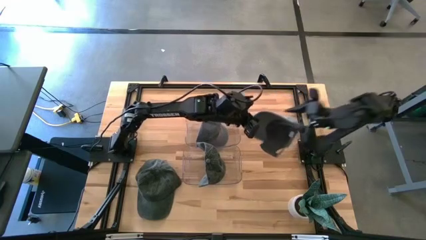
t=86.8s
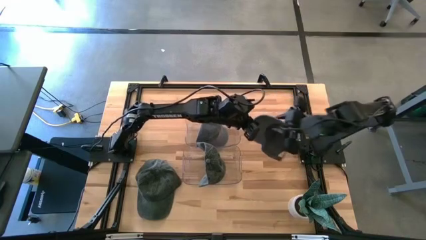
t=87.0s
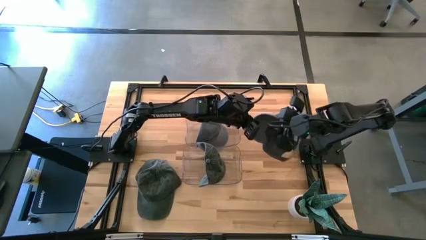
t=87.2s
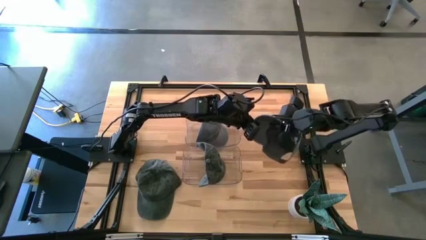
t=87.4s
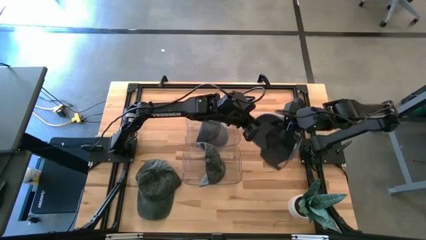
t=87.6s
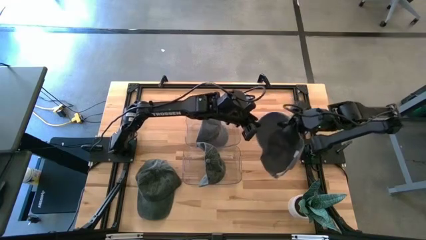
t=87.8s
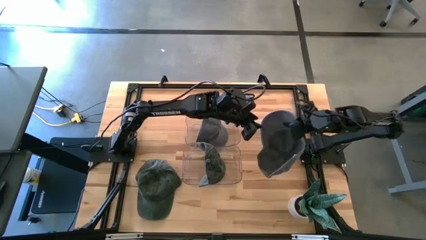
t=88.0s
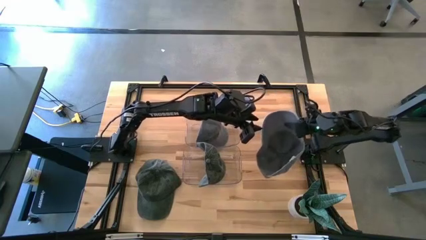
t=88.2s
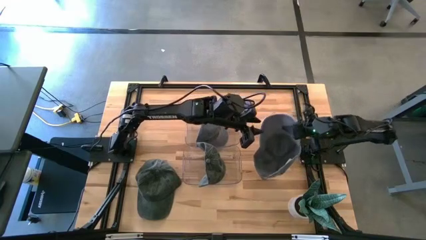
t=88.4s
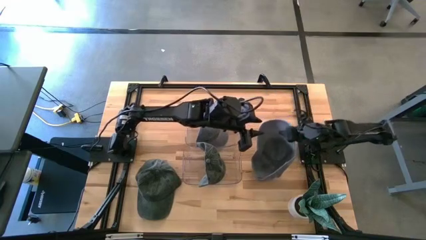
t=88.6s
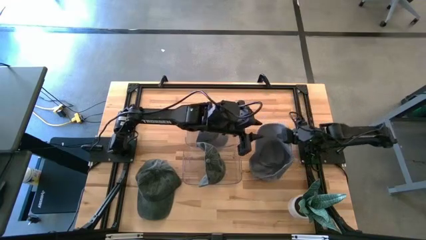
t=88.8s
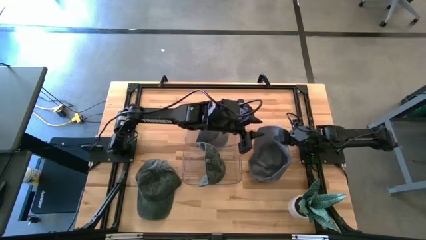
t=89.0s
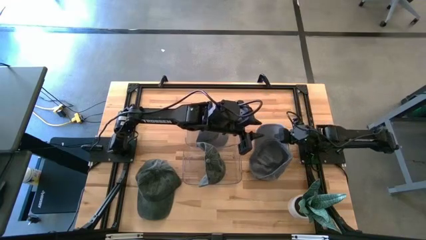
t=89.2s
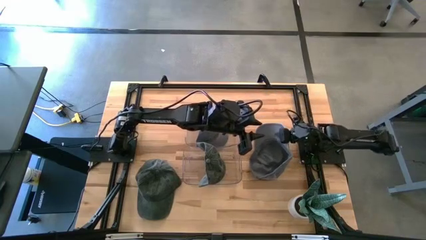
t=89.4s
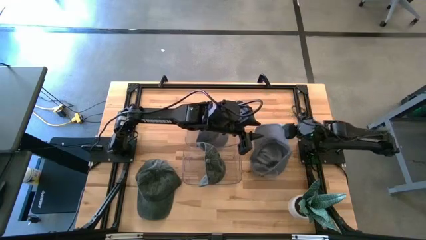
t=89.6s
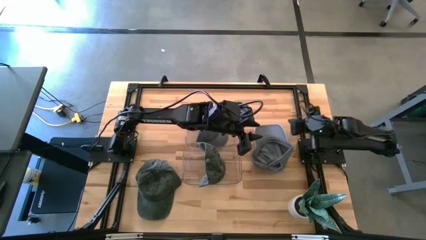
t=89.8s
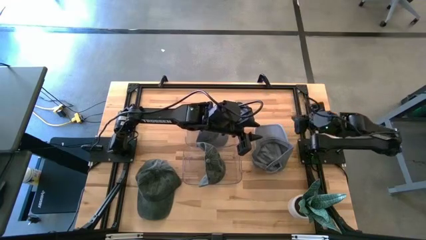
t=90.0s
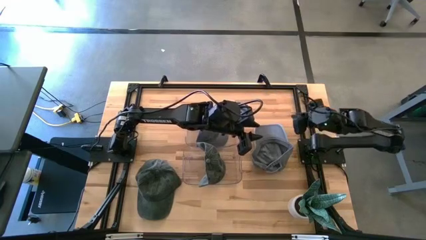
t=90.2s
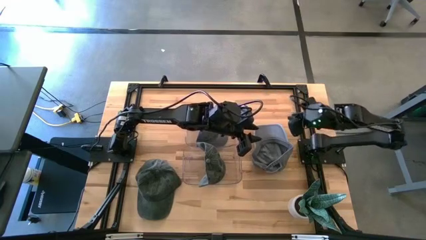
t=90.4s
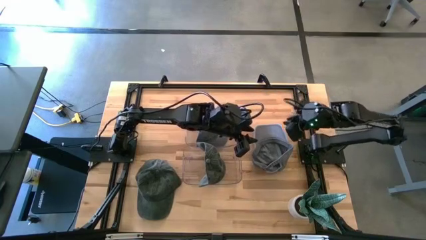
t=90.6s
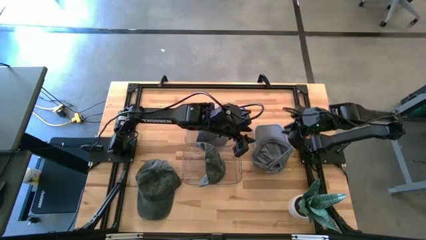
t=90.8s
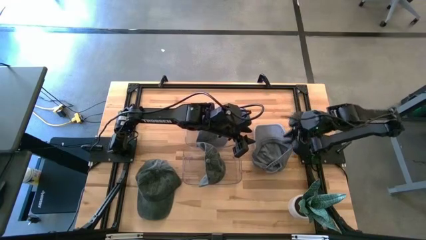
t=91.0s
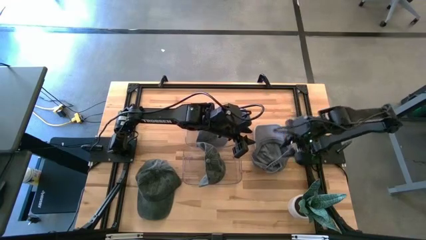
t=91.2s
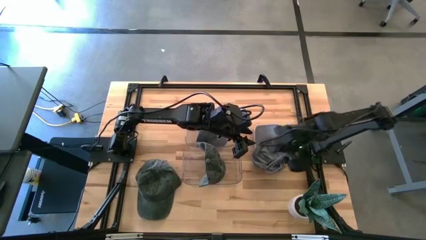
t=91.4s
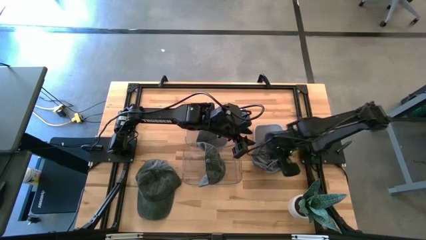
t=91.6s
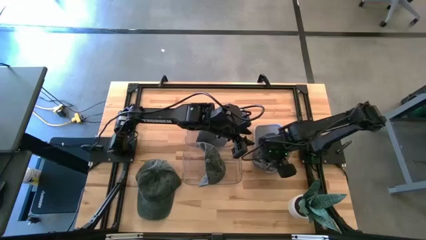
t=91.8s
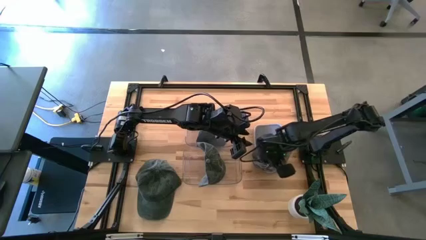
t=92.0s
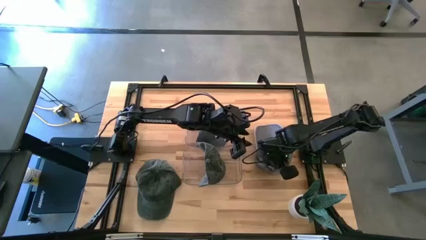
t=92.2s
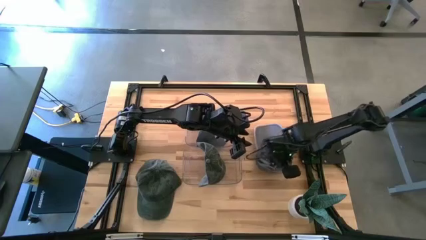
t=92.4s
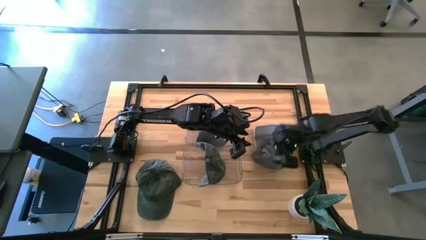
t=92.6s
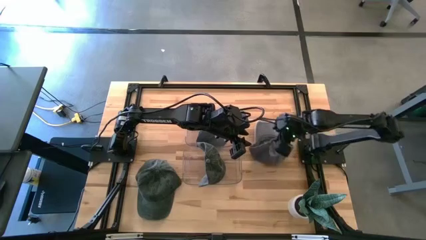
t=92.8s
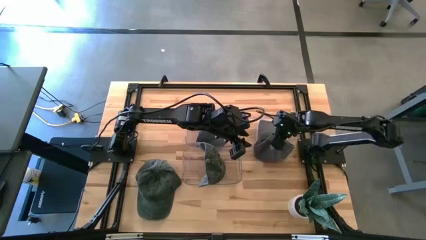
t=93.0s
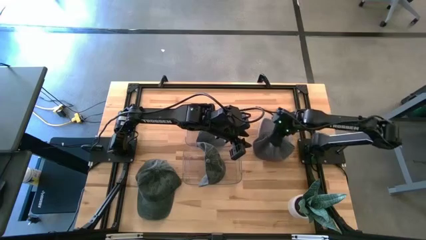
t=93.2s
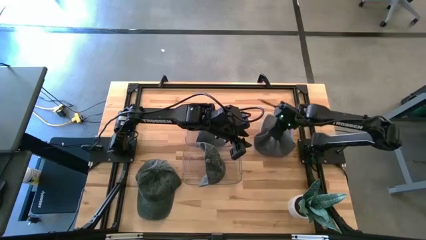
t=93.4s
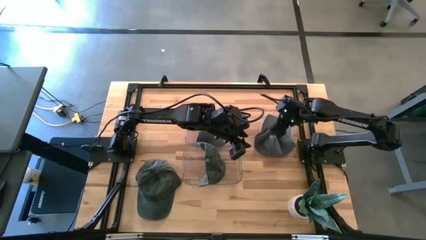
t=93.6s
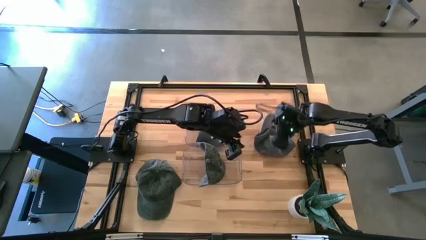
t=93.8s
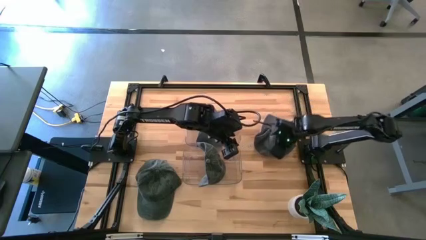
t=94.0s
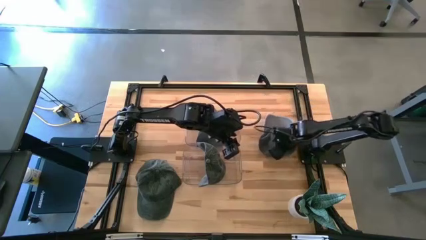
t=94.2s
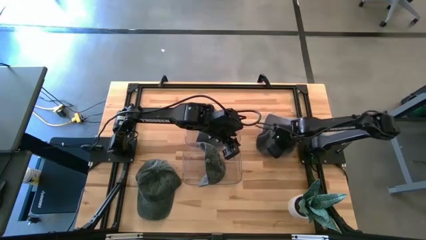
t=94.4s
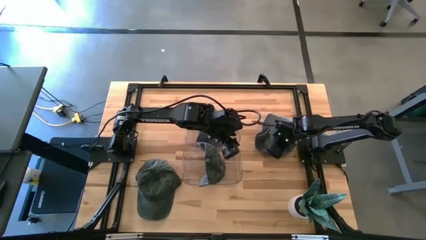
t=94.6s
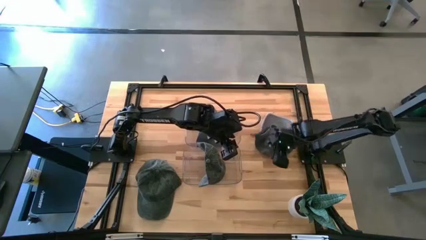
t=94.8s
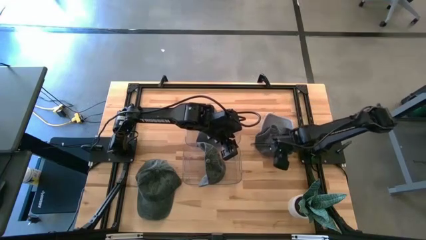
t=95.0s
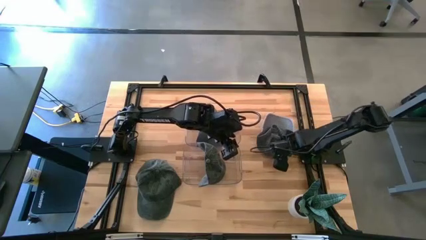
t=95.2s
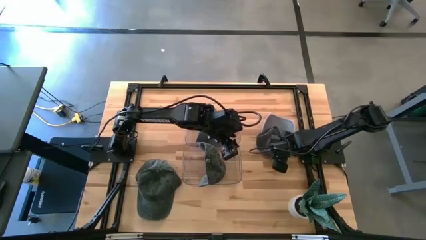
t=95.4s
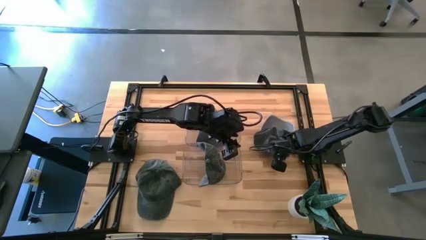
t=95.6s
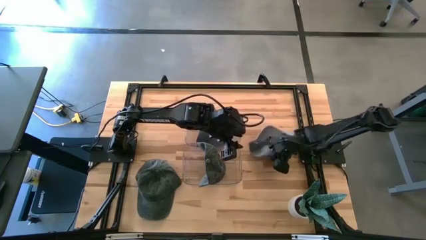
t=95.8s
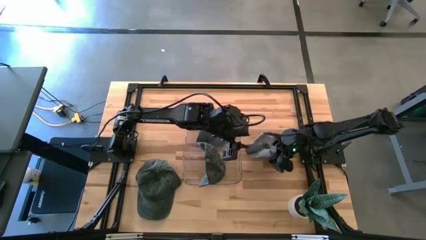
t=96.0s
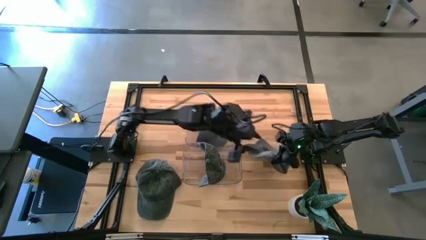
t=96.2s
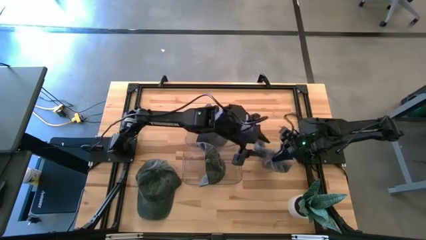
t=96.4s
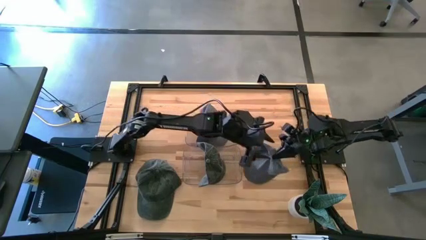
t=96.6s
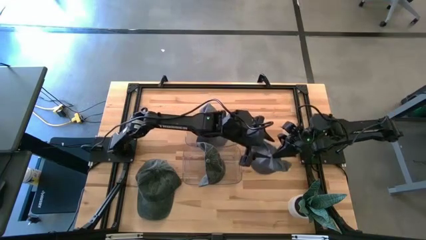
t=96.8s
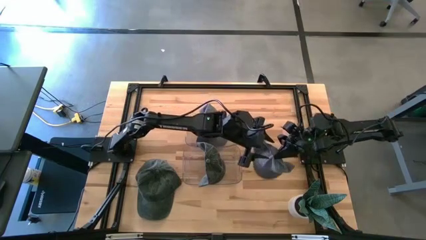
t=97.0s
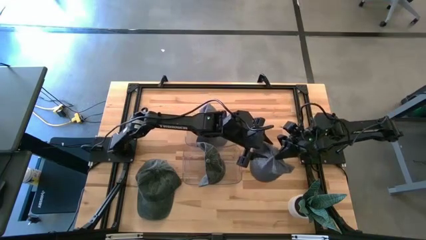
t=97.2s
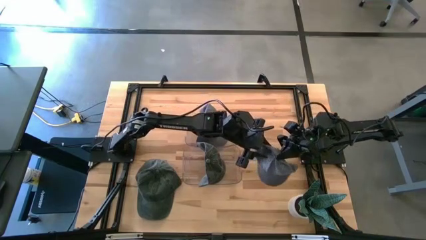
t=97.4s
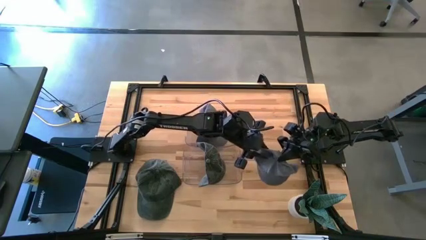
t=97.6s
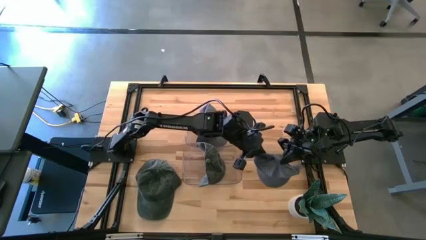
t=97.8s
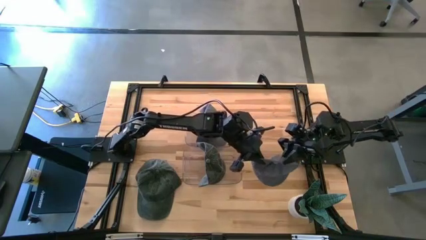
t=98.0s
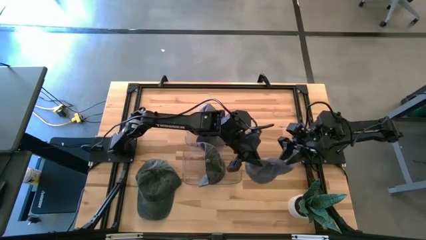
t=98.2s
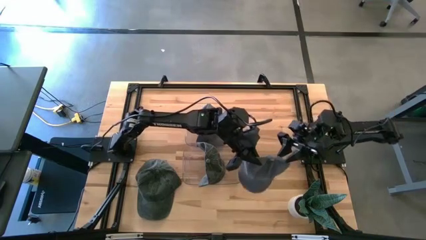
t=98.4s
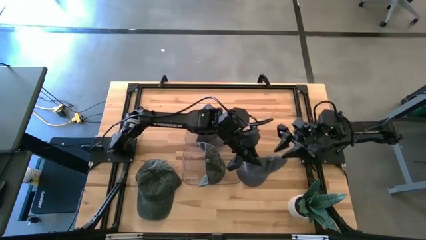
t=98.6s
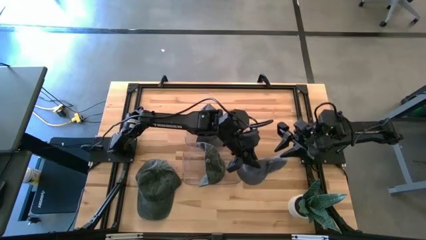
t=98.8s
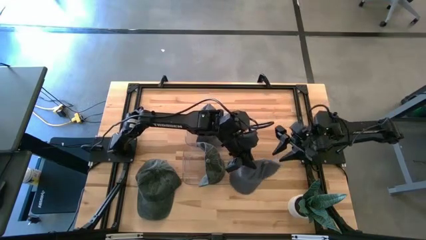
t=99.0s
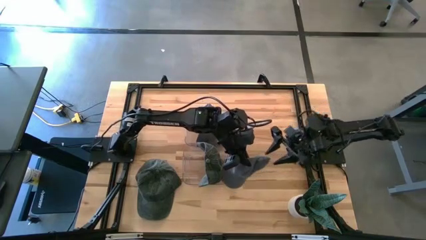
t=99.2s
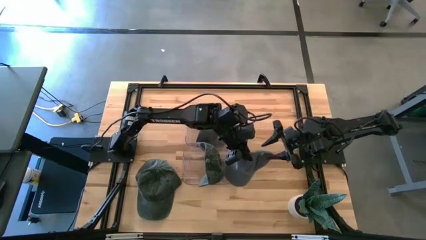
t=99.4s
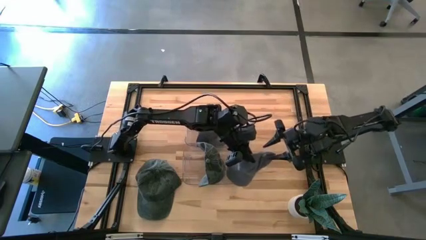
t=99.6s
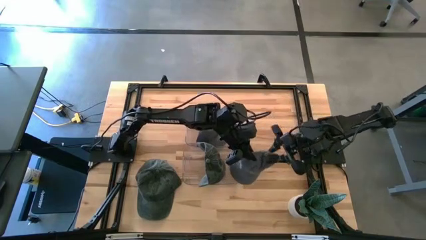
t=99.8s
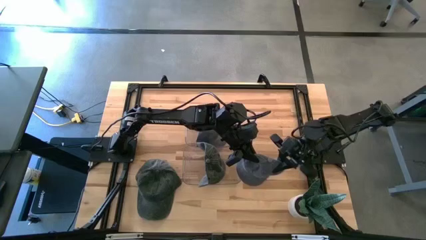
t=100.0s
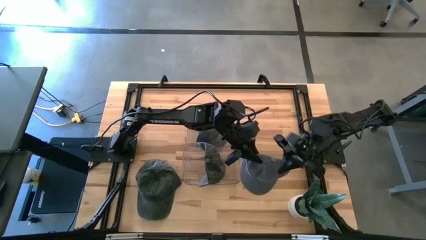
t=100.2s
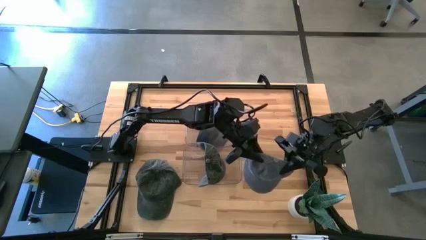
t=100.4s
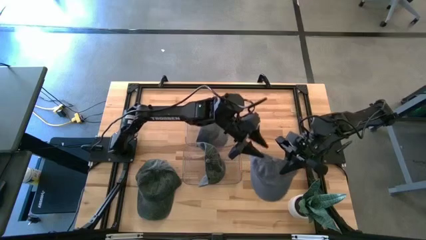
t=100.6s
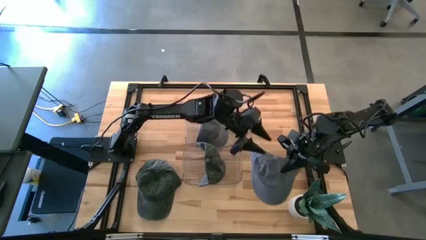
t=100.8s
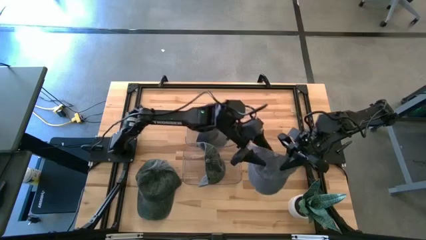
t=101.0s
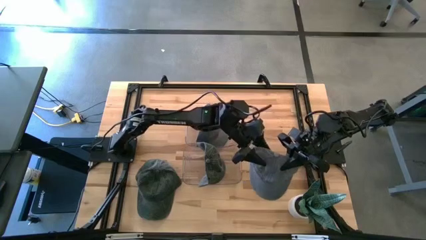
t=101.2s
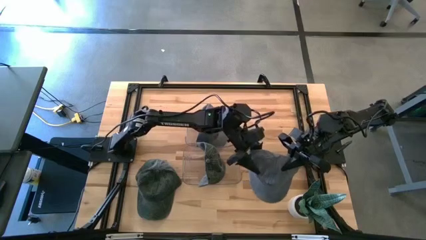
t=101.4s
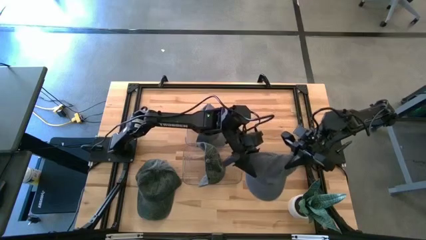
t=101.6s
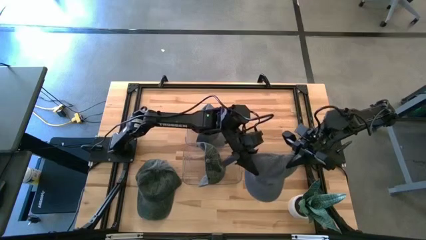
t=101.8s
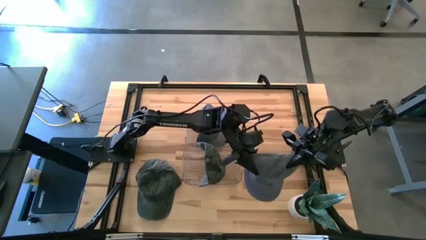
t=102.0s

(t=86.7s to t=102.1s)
Task: Pick & Place hat
Put the gray cap into the top transparent bin
